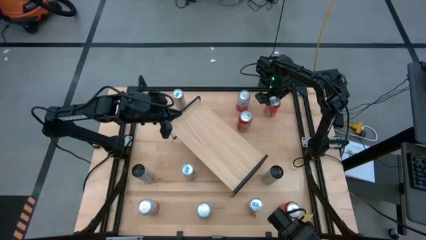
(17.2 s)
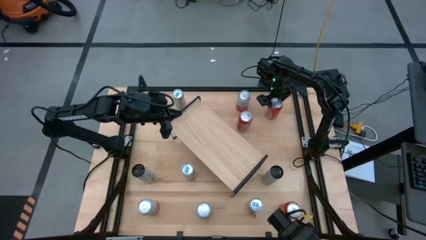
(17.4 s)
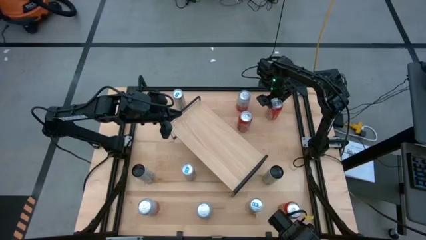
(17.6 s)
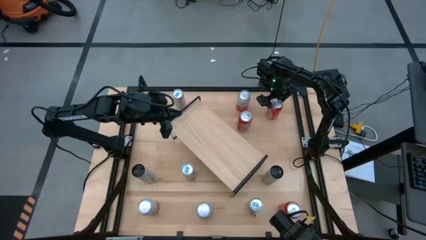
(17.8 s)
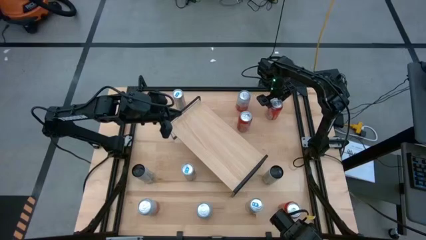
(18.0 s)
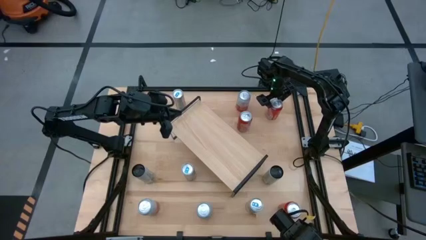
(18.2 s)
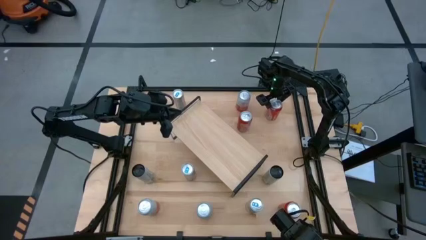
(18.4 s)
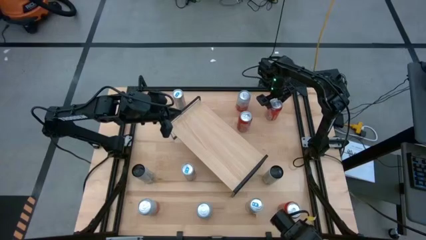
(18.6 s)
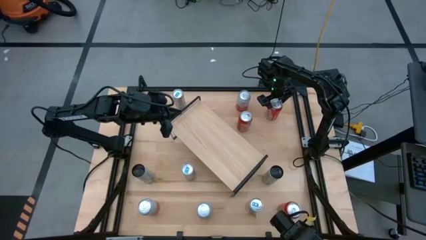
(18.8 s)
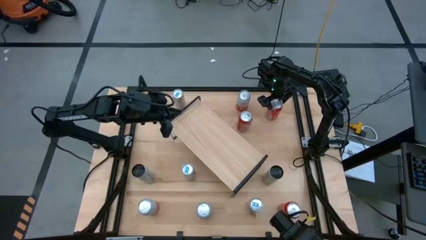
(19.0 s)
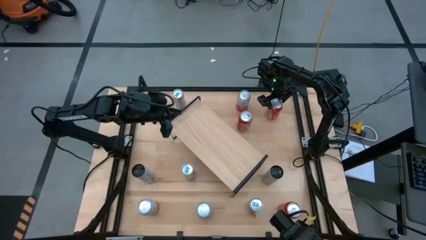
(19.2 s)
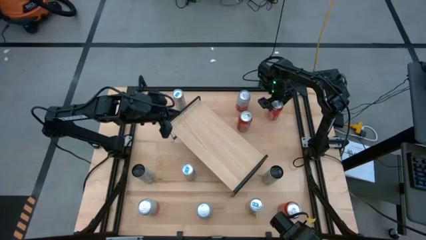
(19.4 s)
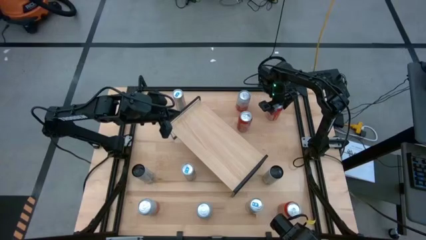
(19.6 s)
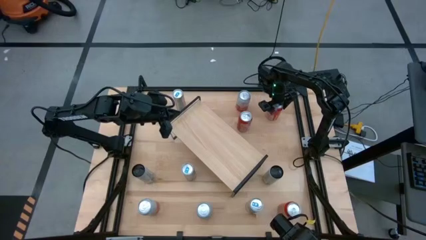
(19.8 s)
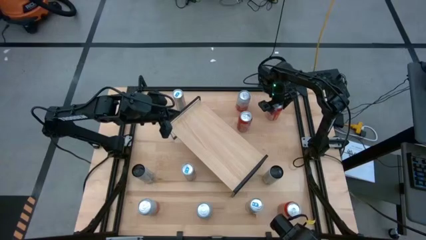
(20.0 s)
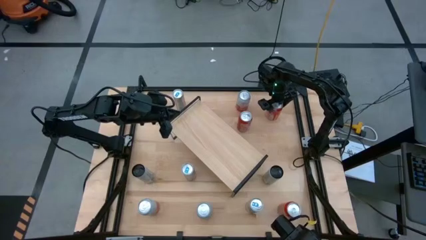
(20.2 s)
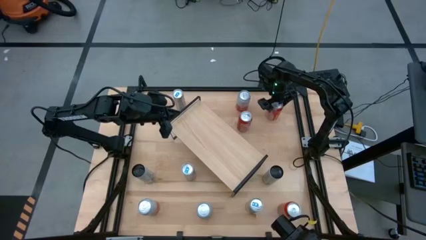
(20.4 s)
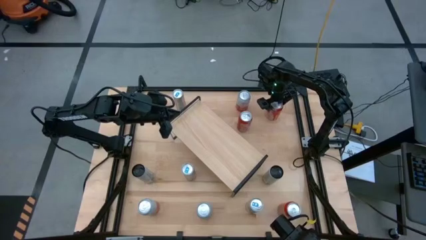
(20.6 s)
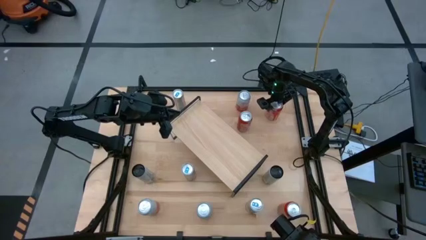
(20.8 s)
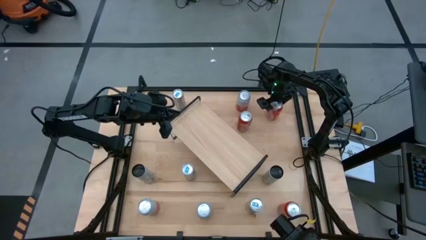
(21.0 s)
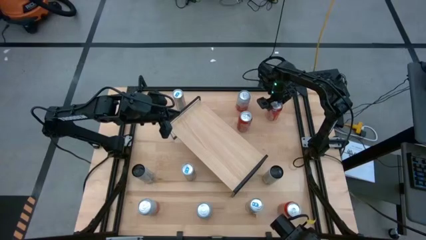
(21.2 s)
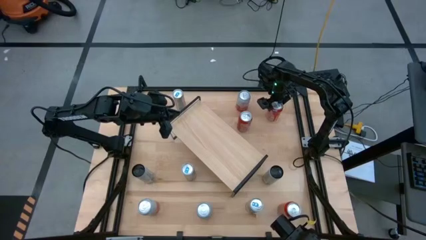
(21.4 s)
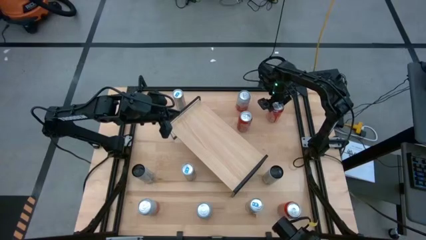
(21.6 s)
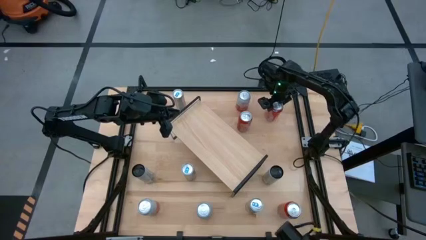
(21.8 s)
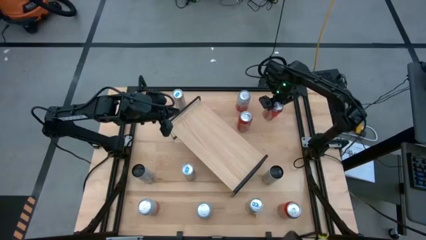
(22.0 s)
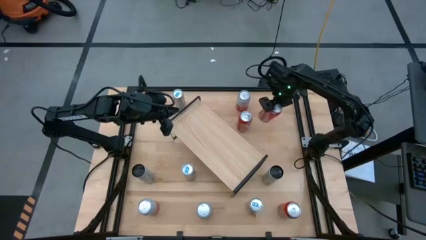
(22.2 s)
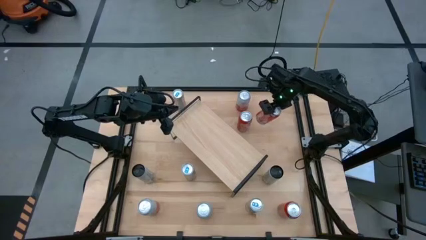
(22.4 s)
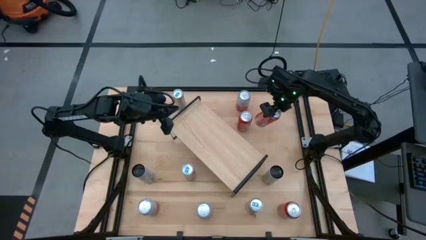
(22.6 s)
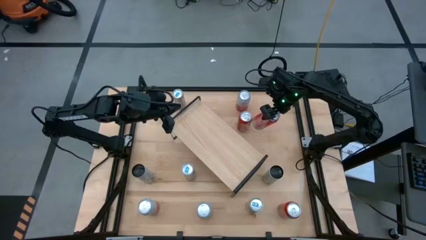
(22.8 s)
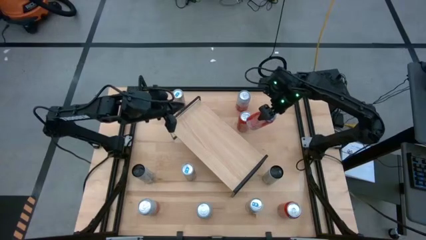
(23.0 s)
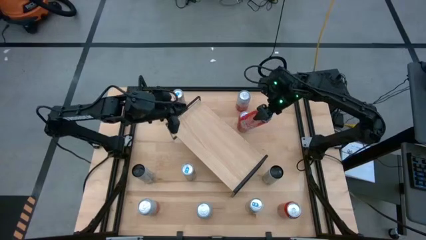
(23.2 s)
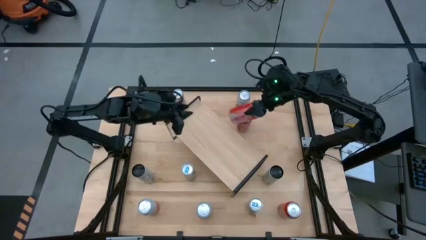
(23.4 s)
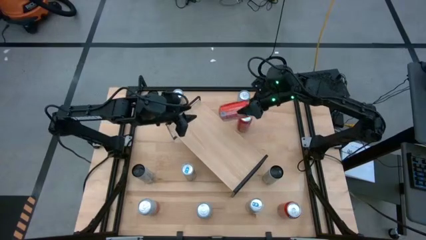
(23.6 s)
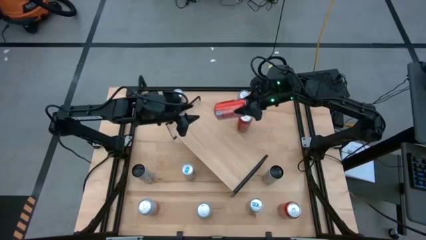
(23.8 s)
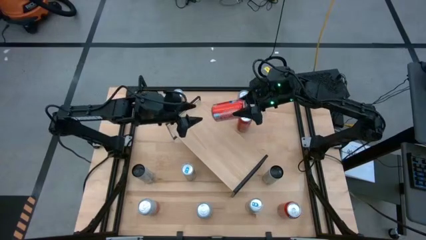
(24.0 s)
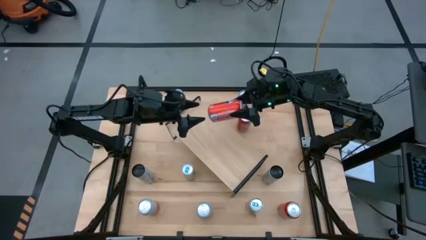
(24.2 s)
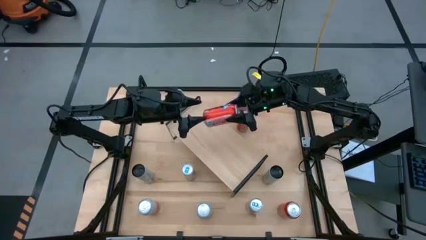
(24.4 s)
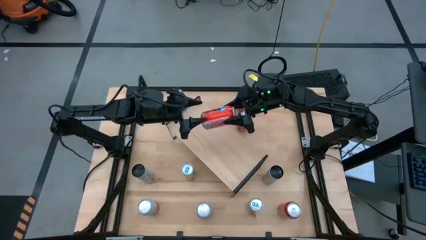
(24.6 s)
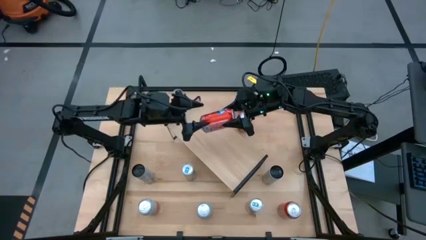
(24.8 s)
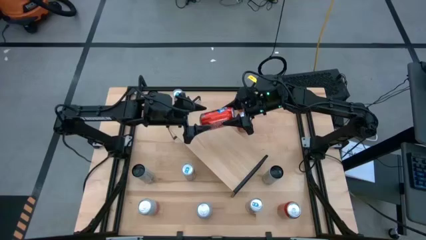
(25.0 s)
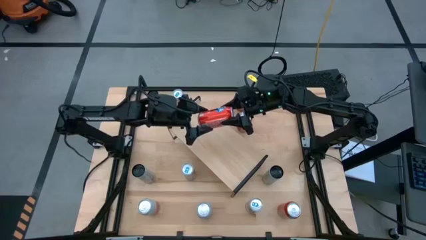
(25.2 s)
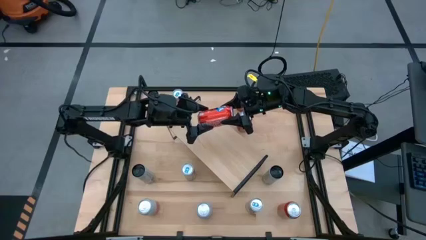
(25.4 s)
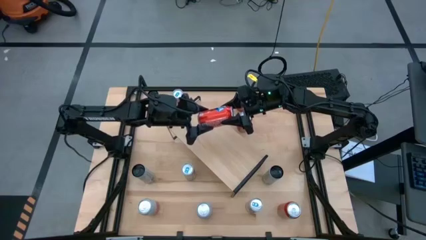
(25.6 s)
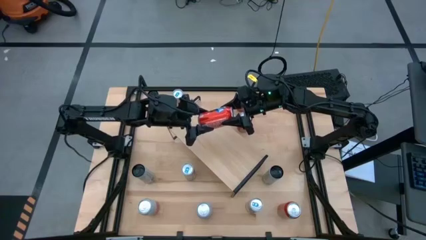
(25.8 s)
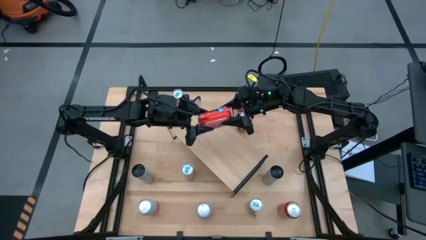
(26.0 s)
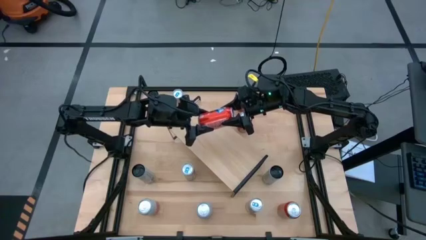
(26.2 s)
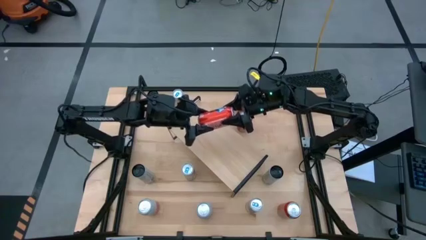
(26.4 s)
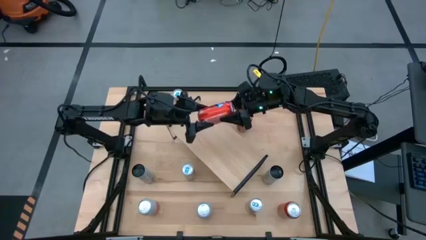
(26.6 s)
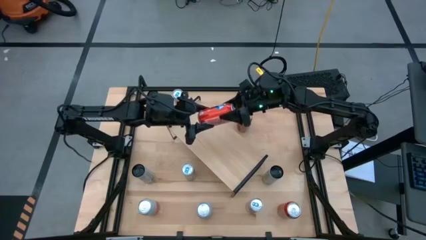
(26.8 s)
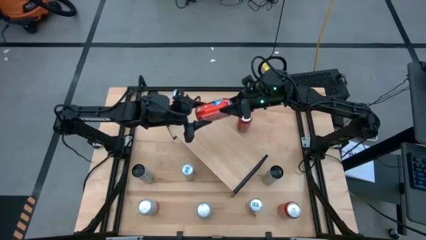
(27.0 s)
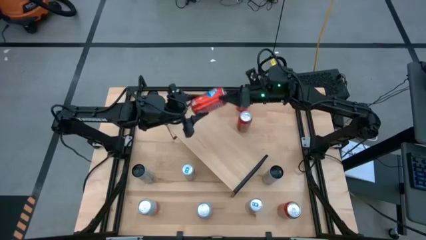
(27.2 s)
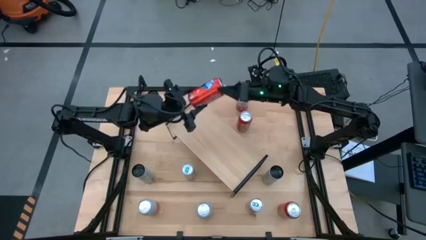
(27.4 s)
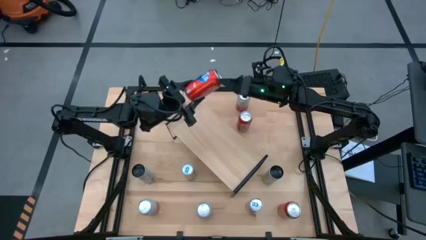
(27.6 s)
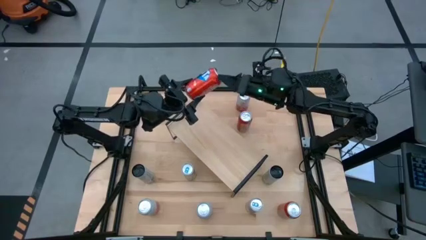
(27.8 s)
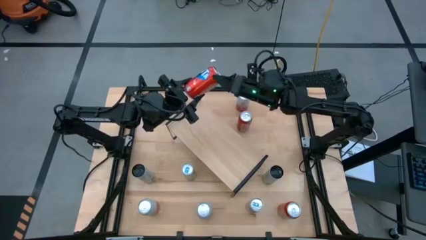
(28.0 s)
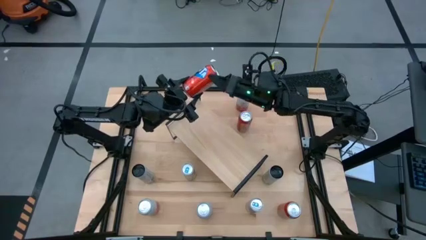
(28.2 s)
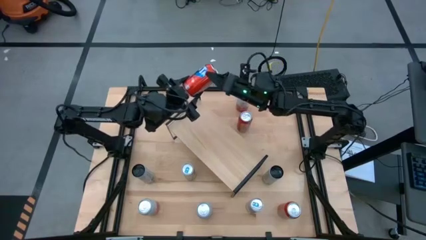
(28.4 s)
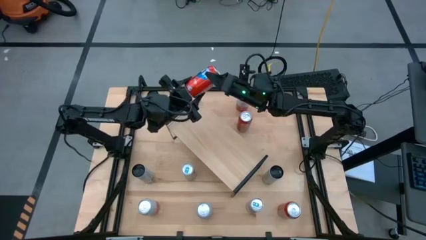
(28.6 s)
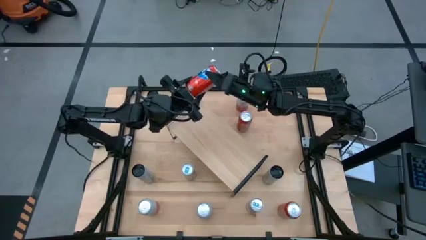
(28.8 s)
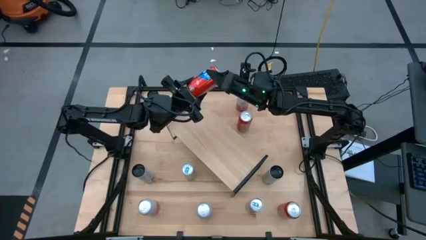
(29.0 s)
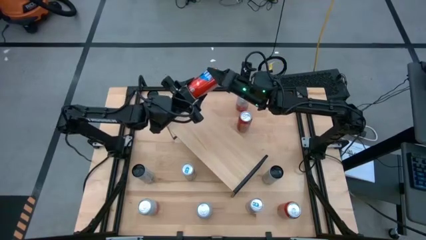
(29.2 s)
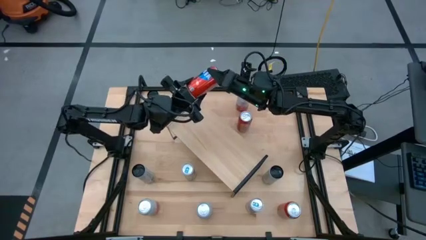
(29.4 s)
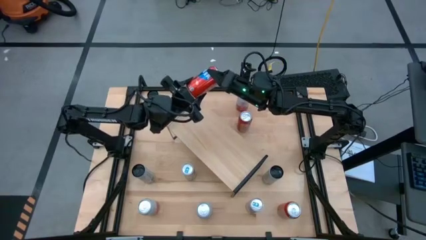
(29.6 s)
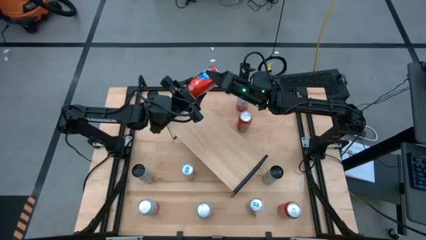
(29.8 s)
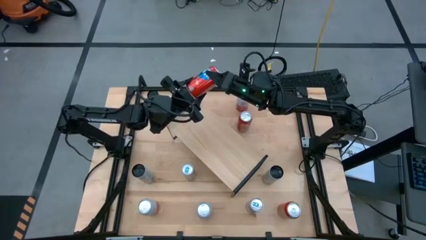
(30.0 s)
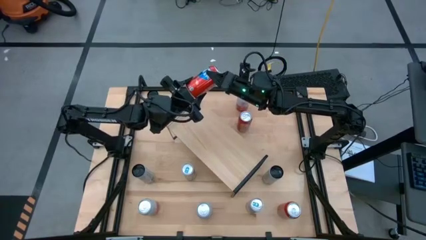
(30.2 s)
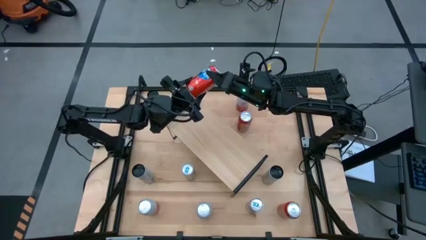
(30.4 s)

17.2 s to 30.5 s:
Task: Place canned beverage on shelf
Put the top red soda can on the shelf

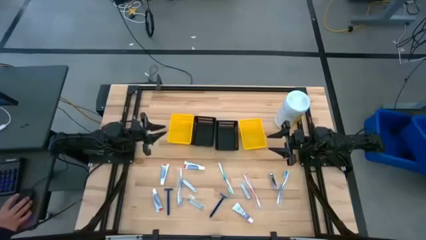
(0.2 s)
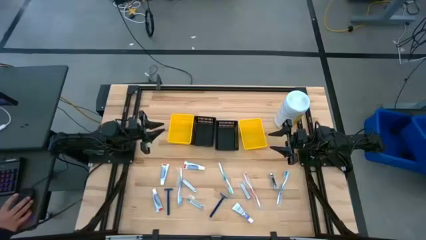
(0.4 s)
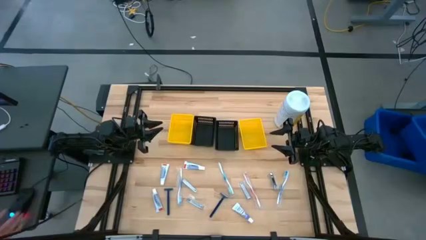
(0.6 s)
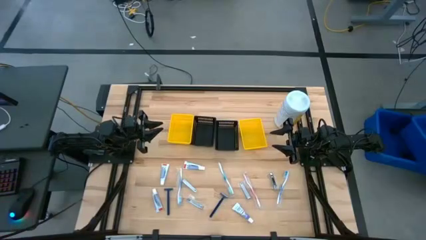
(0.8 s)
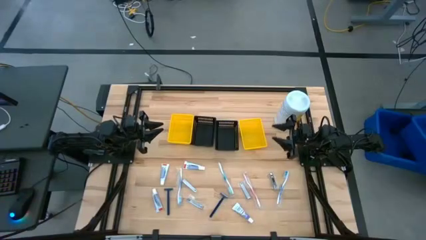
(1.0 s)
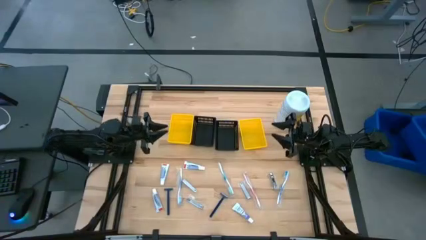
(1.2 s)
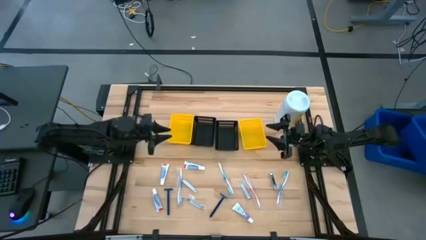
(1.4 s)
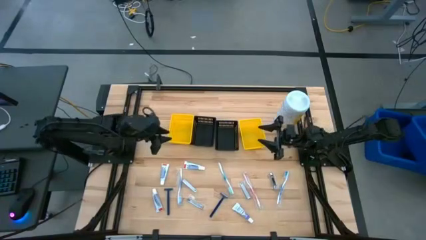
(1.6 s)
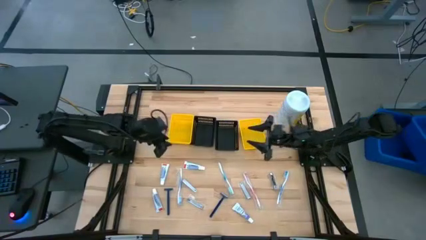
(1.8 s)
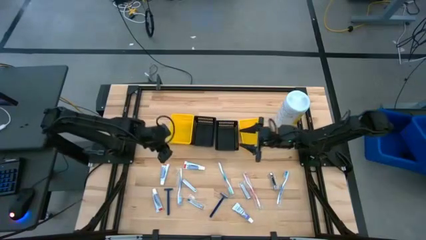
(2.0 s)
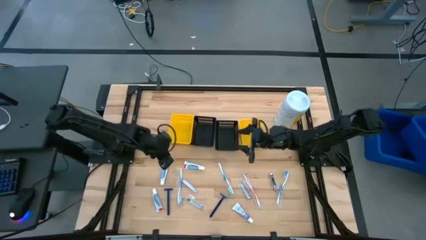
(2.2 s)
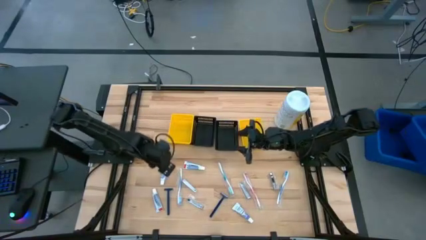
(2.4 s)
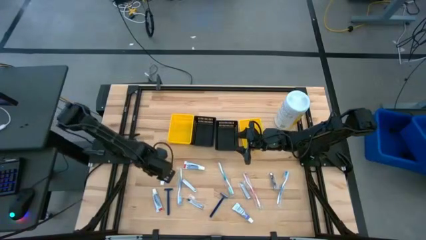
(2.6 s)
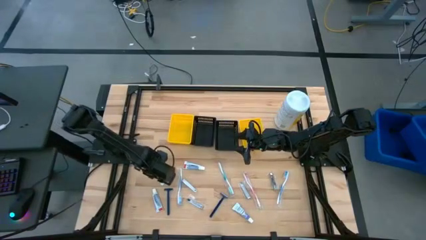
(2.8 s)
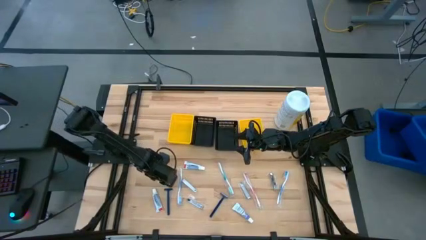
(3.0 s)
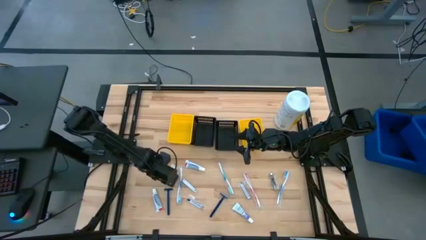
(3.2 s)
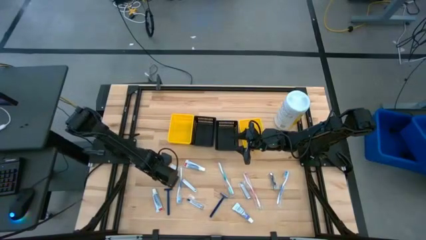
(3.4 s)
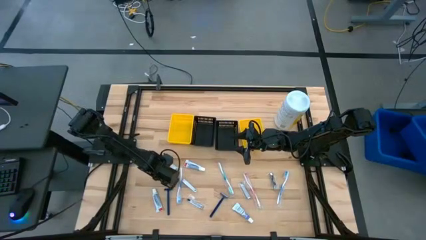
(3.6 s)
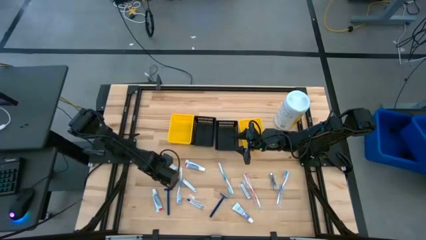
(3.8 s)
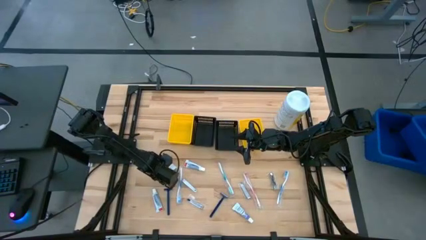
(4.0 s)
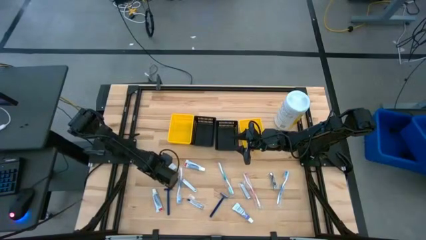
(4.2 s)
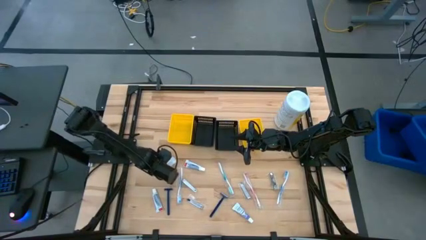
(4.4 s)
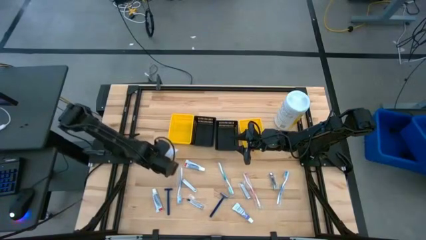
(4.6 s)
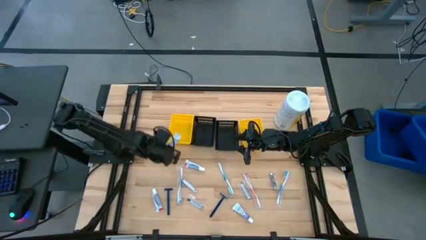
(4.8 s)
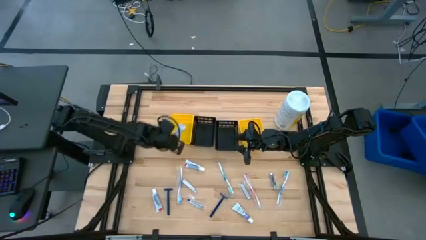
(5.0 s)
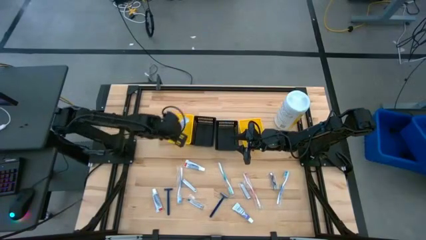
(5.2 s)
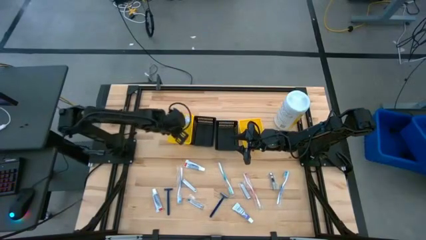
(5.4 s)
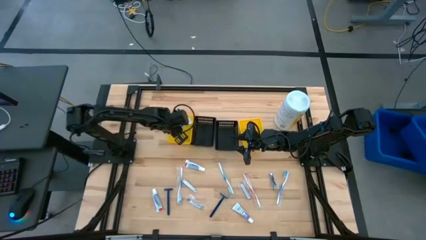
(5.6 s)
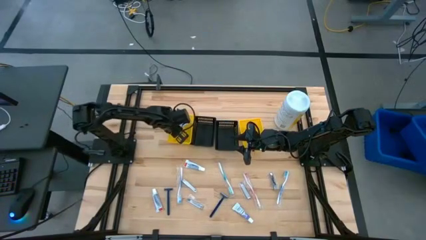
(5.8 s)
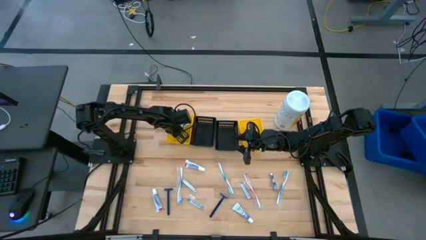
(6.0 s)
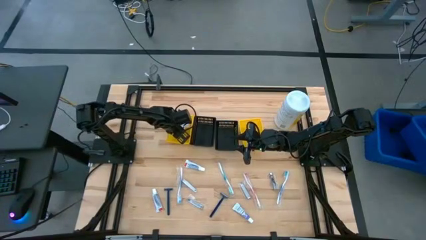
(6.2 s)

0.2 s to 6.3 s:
Task: Pick & Place Travel size toiletries
Put the white toothpaste into the left yellow bin
